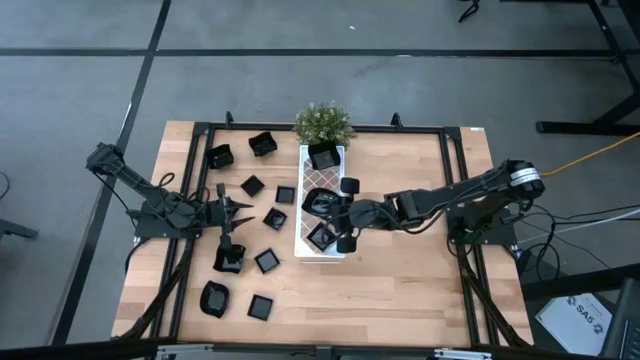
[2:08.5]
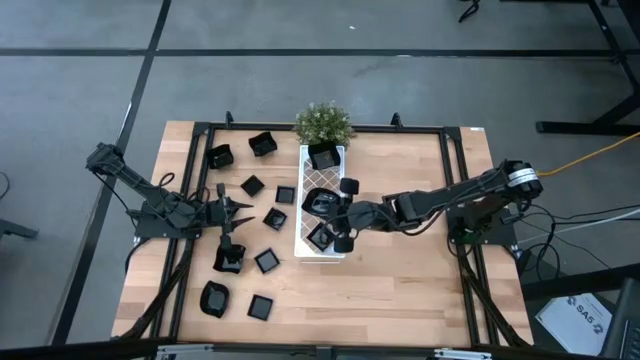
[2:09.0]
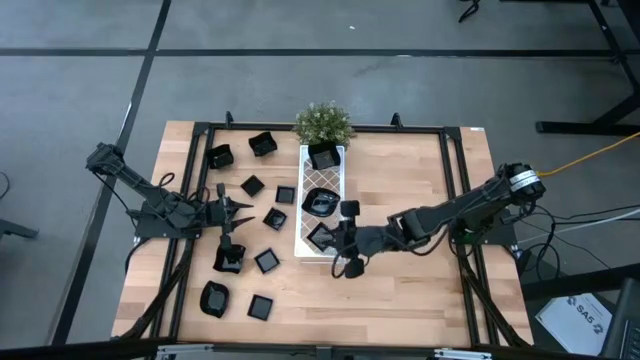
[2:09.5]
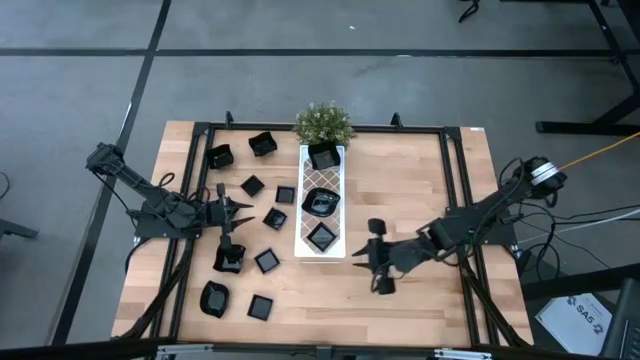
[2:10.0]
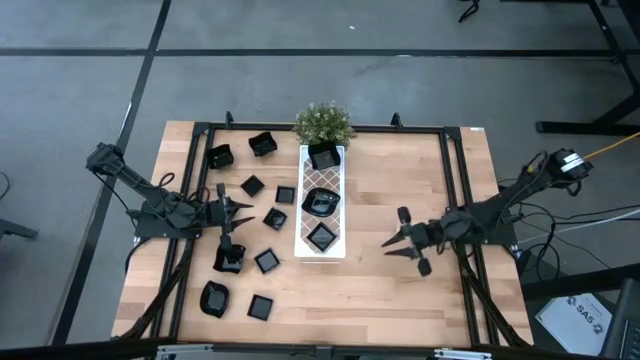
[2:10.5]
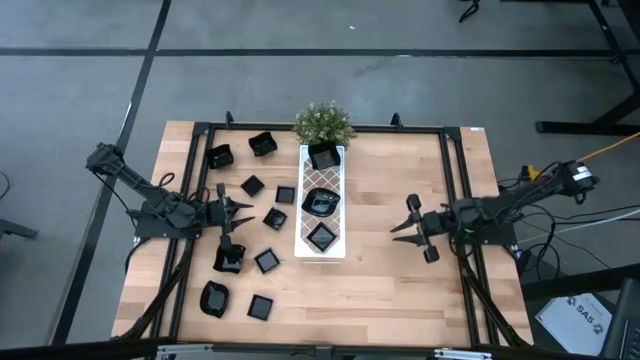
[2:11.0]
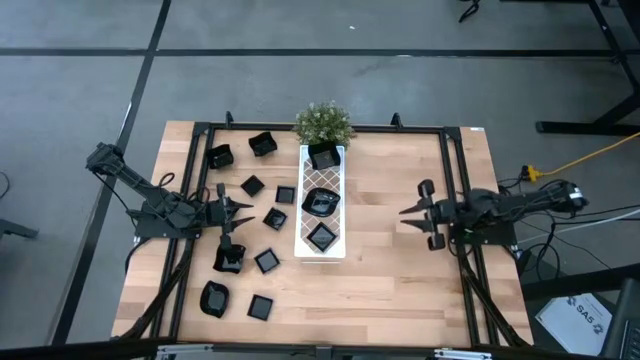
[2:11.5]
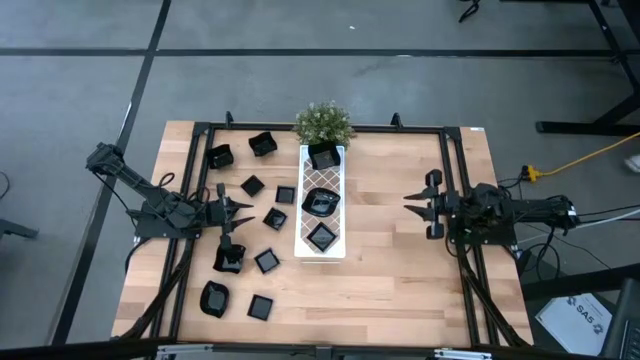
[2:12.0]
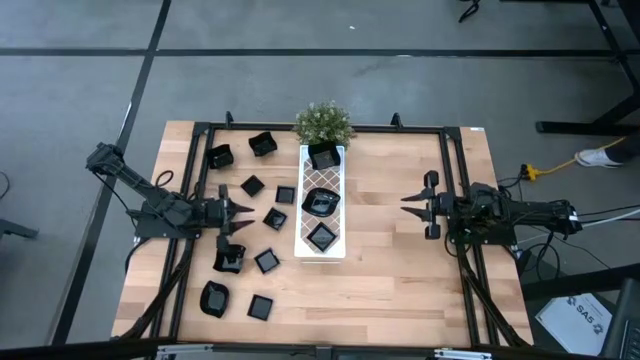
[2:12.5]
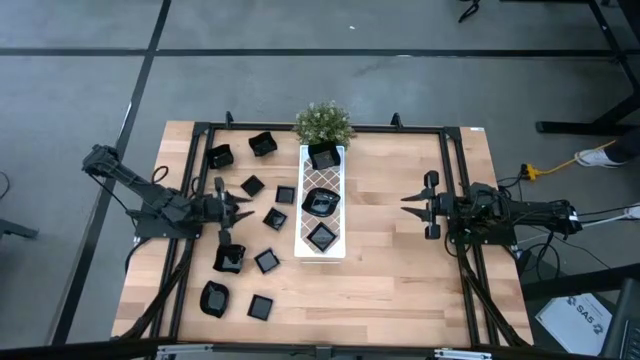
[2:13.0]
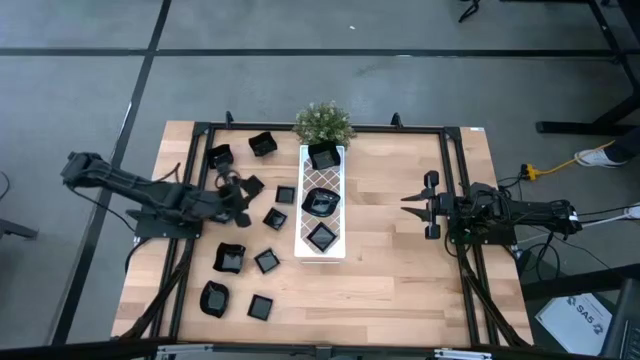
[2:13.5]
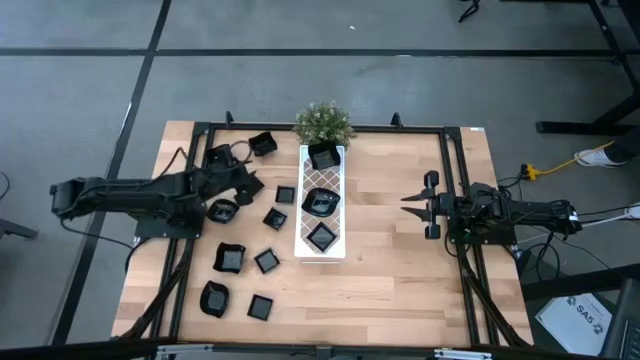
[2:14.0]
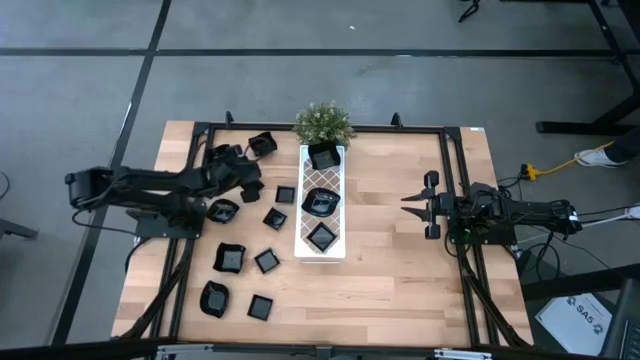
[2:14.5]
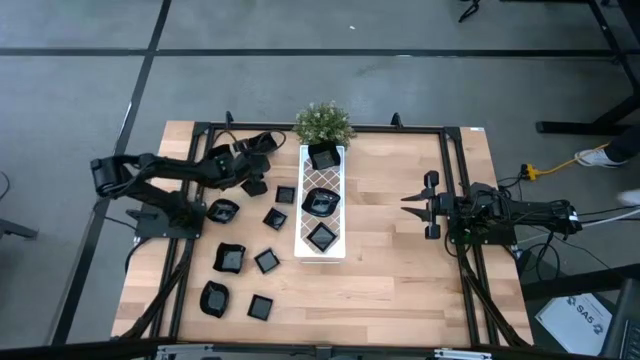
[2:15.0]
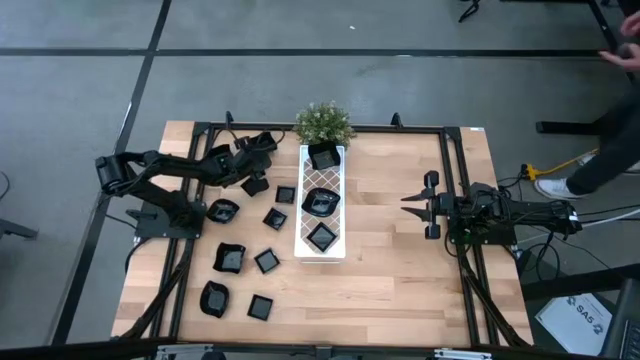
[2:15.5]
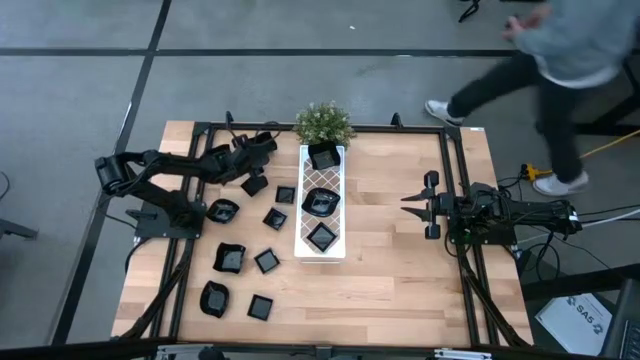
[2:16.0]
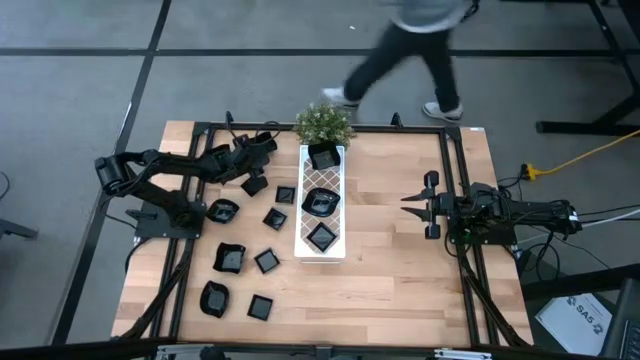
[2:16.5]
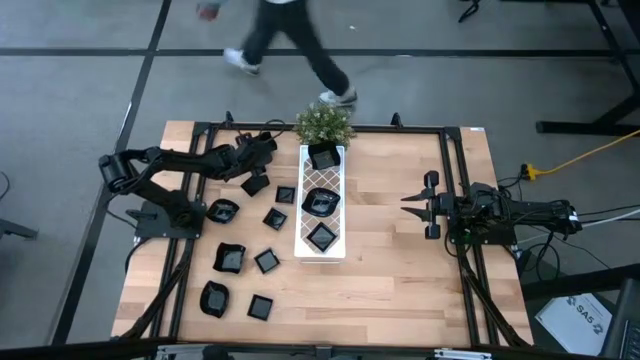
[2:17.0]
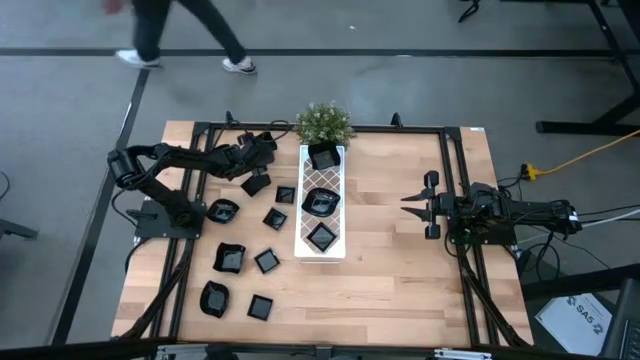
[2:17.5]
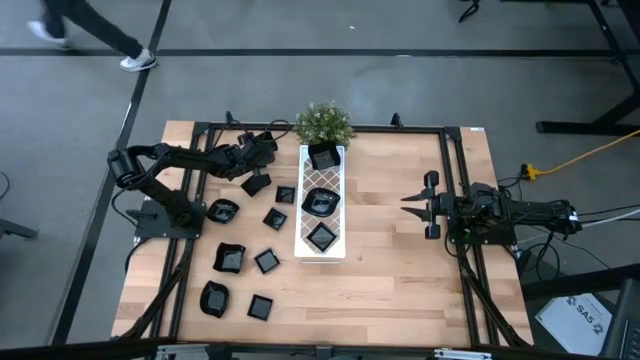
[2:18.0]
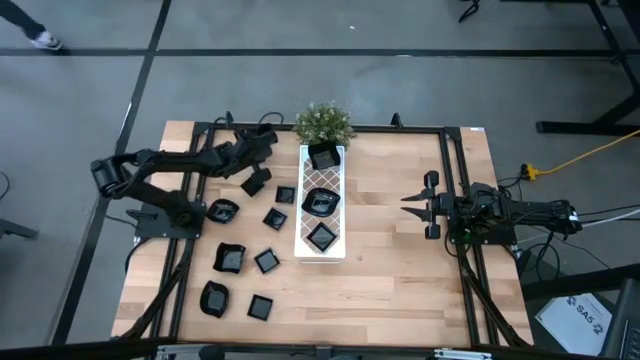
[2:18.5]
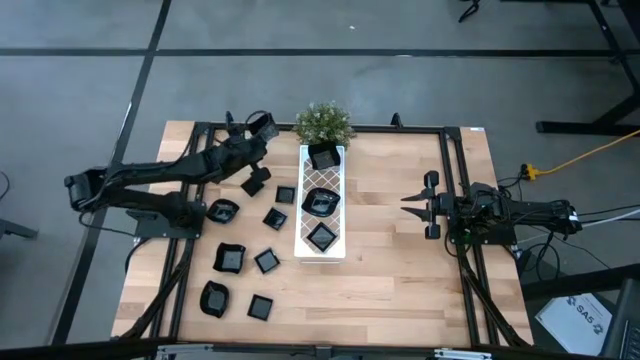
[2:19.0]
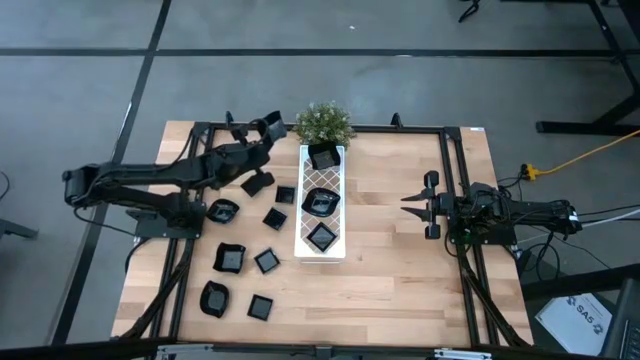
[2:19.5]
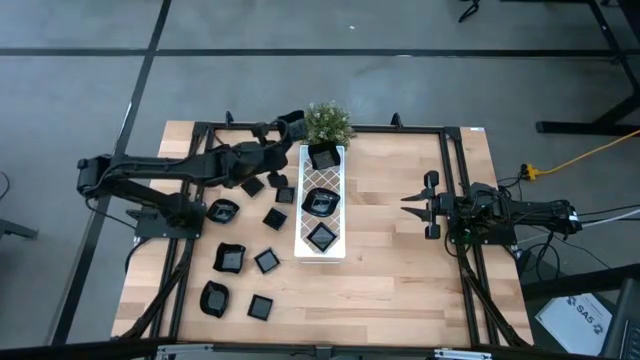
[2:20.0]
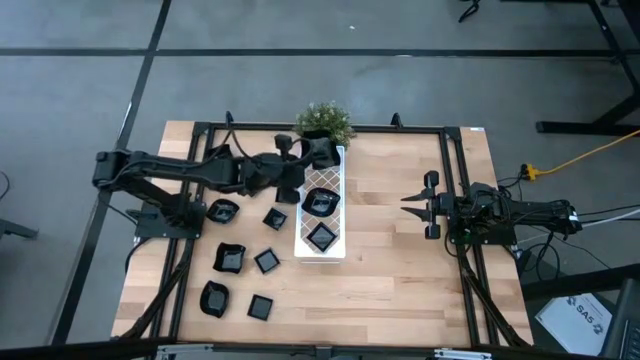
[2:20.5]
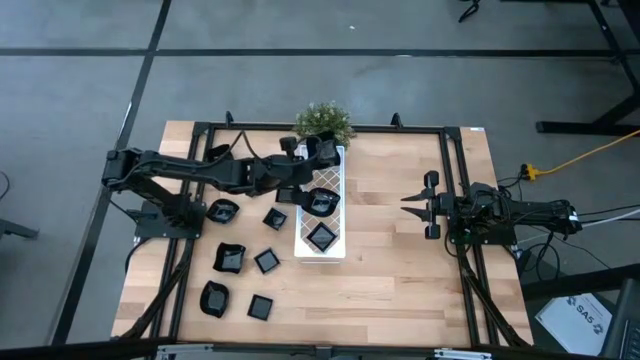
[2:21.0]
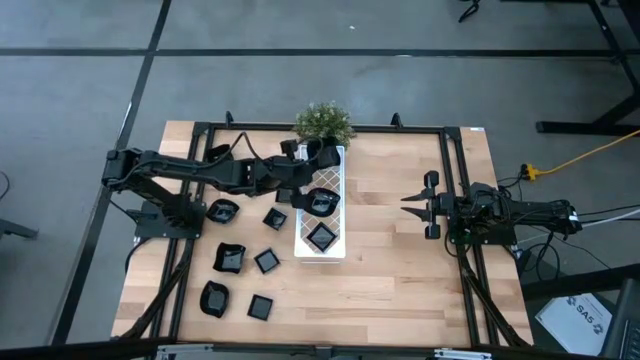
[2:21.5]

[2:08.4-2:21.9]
Task: Pick & Place Mini shaped plates
Stack the distorted square plate on top of the distorted square plate on the shelf

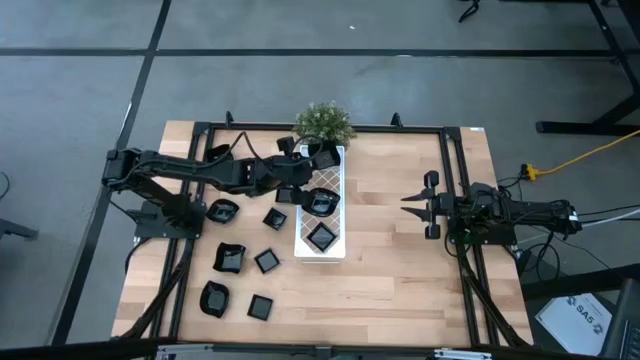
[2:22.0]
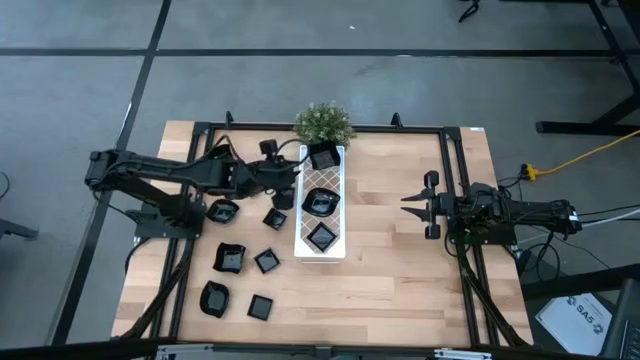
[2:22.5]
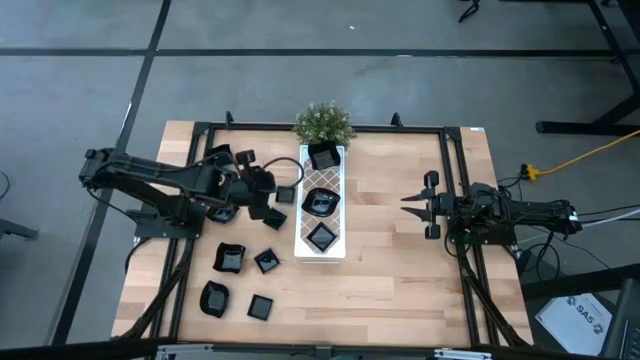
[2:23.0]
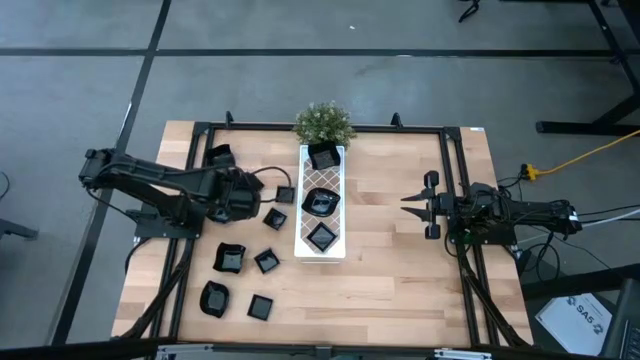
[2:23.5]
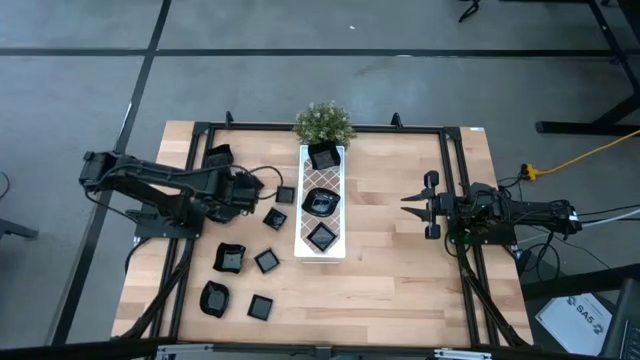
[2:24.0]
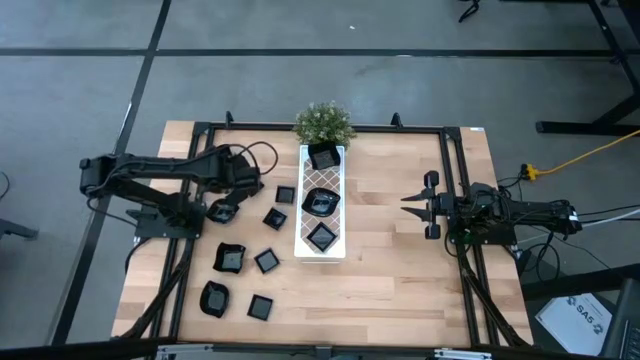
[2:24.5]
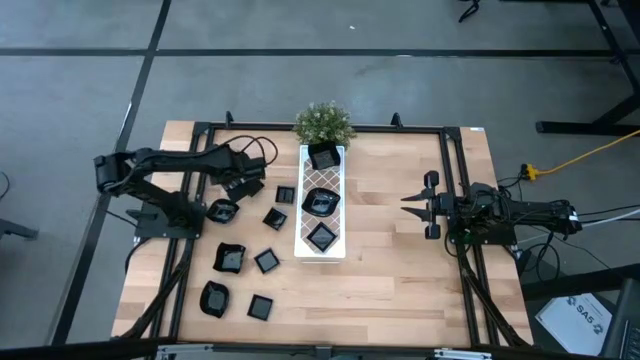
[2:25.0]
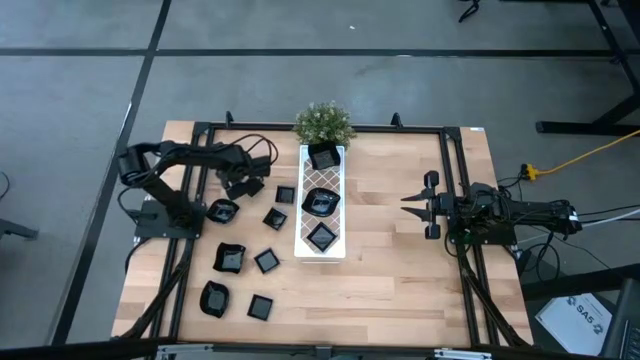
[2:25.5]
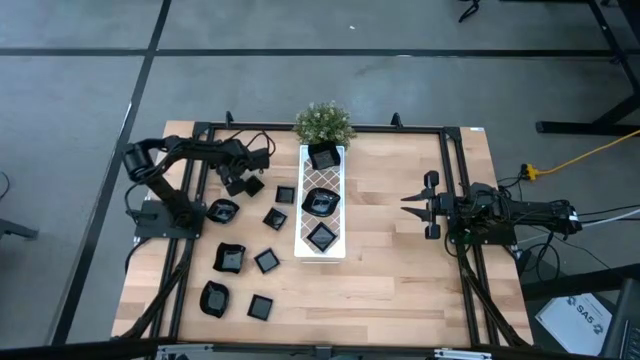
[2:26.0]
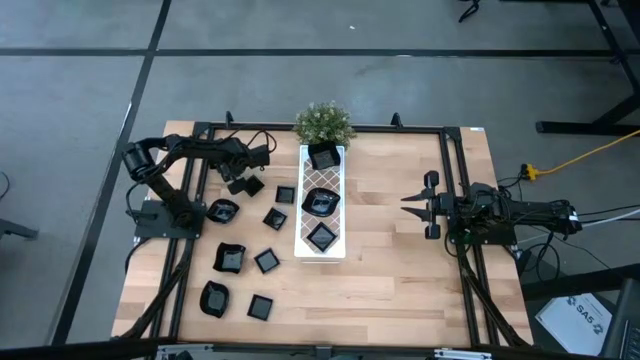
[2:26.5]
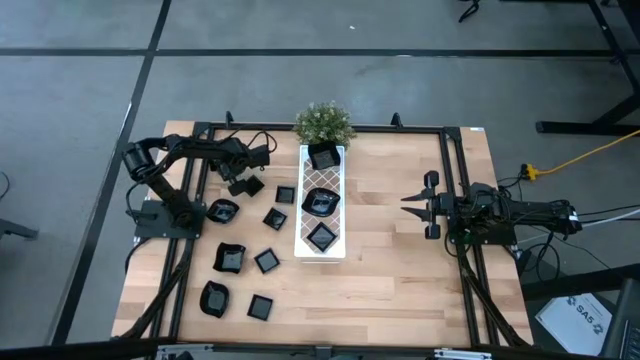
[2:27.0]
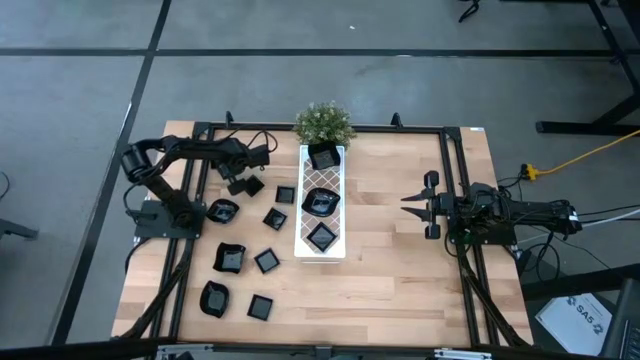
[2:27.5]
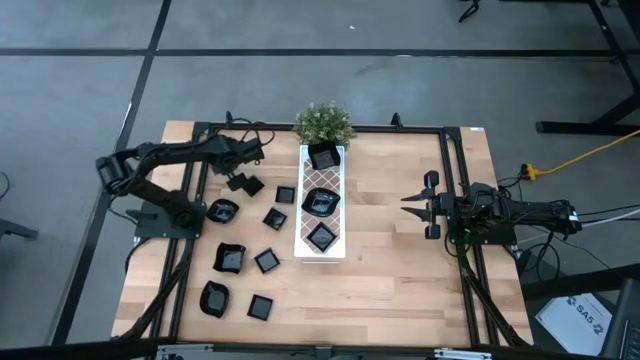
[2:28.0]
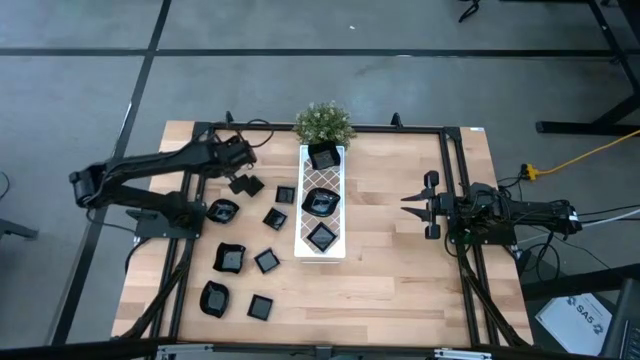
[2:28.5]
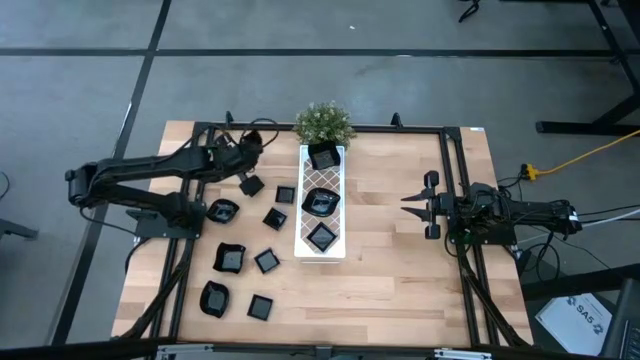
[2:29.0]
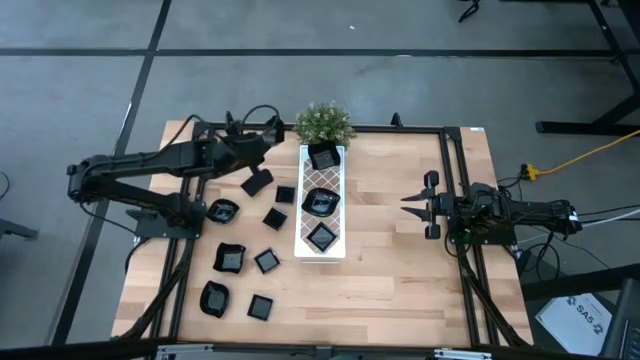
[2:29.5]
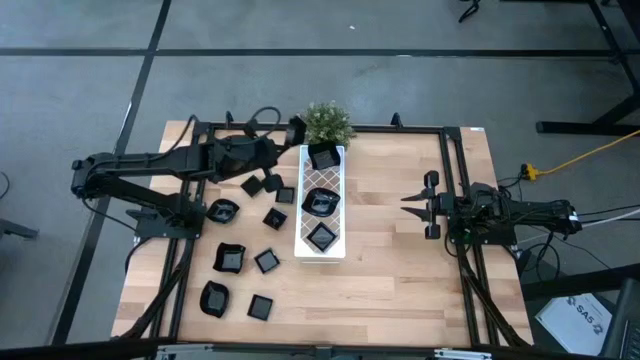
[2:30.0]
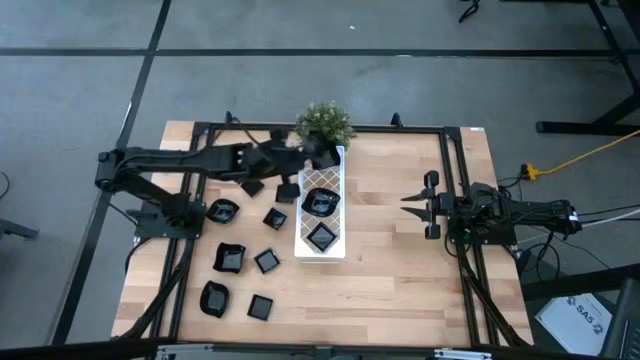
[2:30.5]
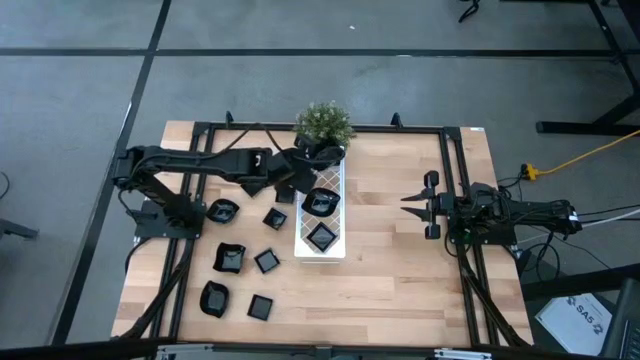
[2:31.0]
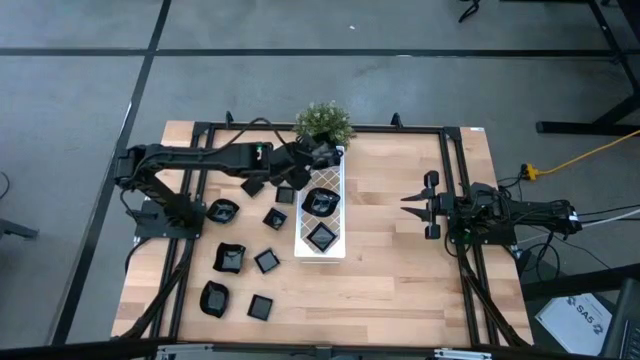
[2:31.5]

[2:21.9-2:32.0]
Stack the distorted square plate on top of the distorted square plate on the shelf
